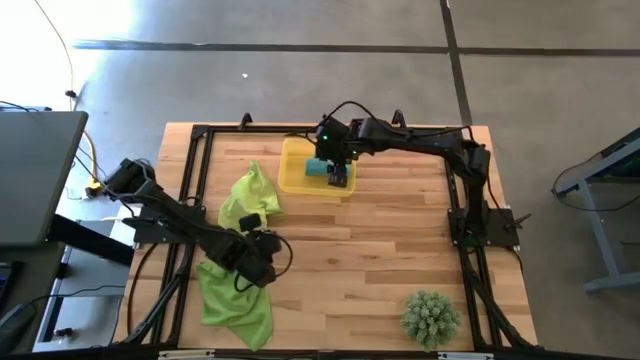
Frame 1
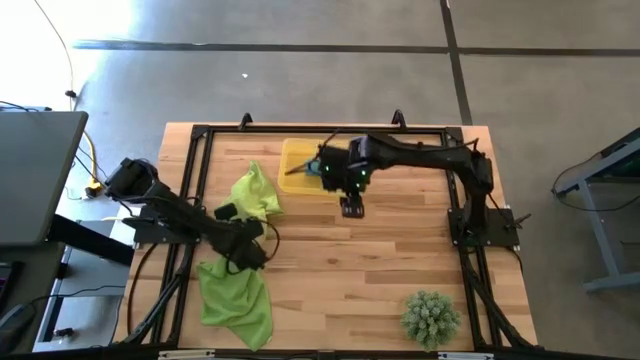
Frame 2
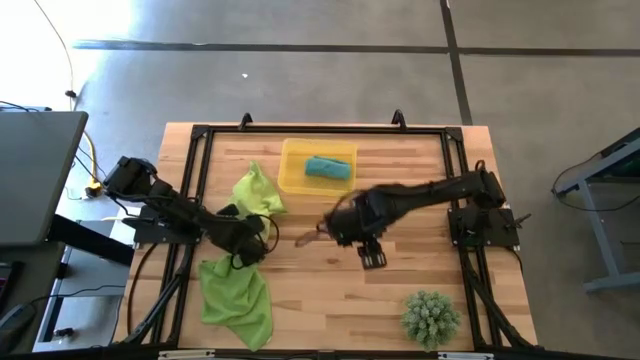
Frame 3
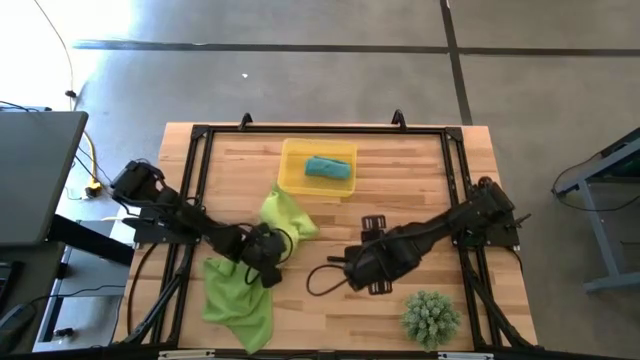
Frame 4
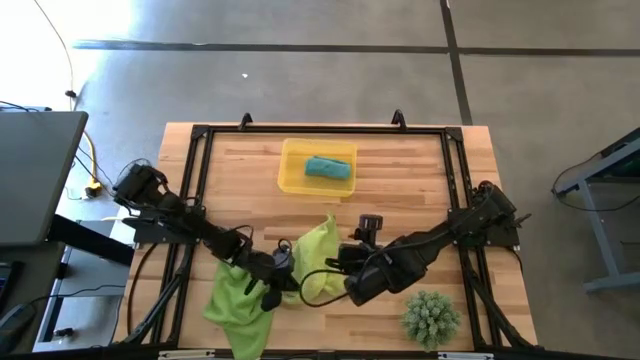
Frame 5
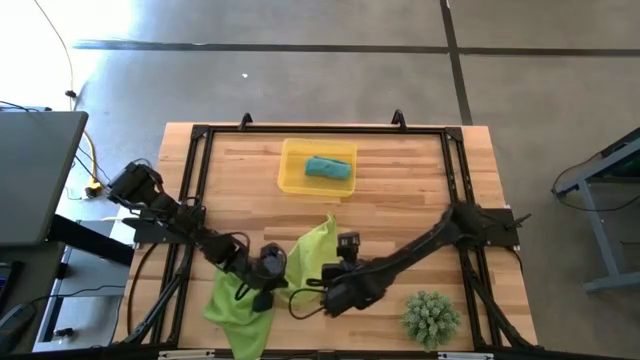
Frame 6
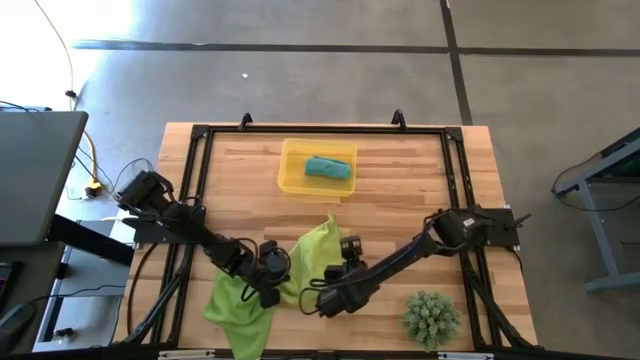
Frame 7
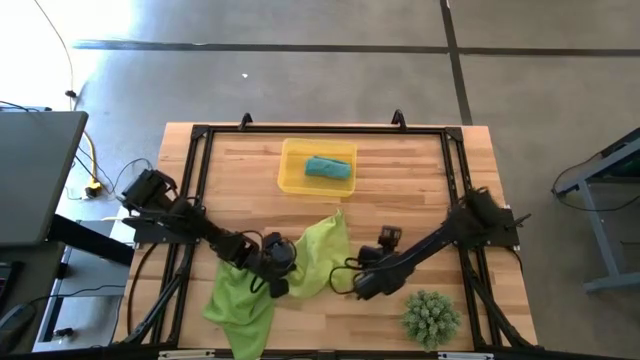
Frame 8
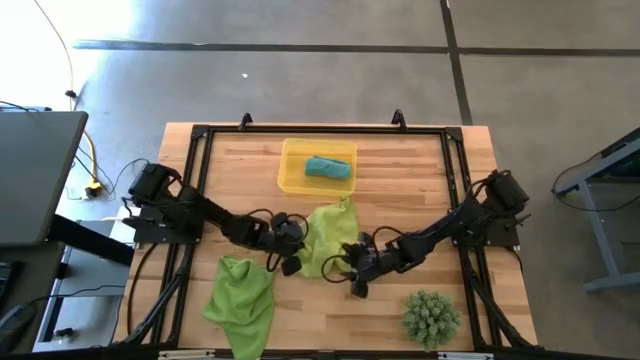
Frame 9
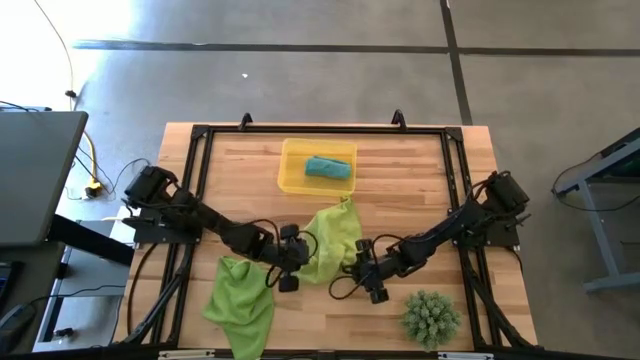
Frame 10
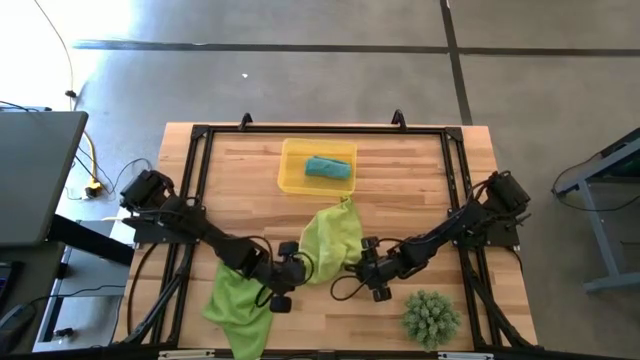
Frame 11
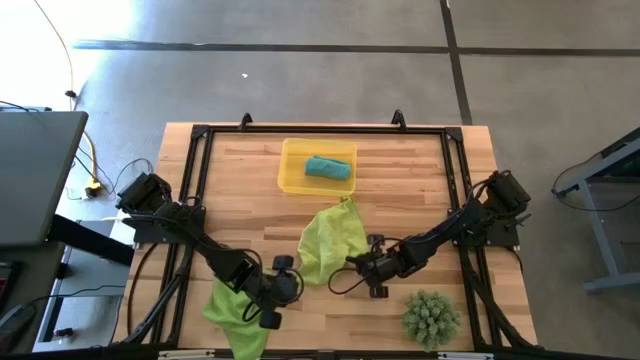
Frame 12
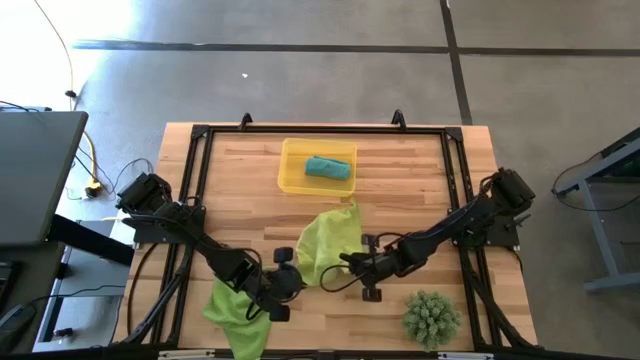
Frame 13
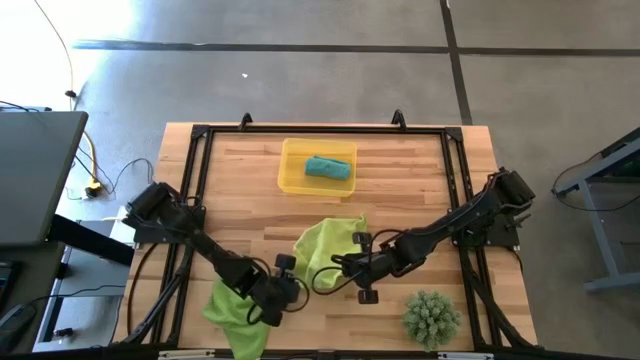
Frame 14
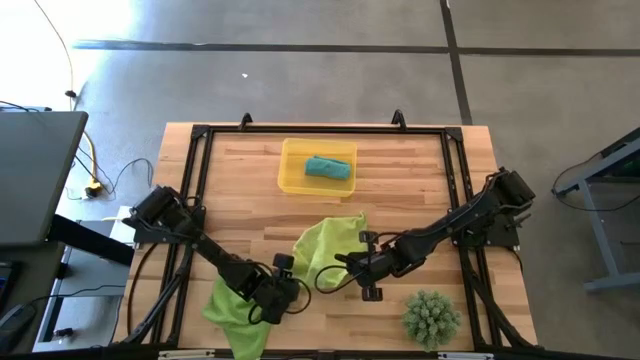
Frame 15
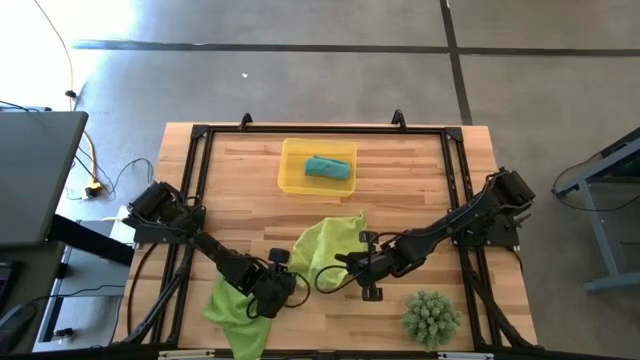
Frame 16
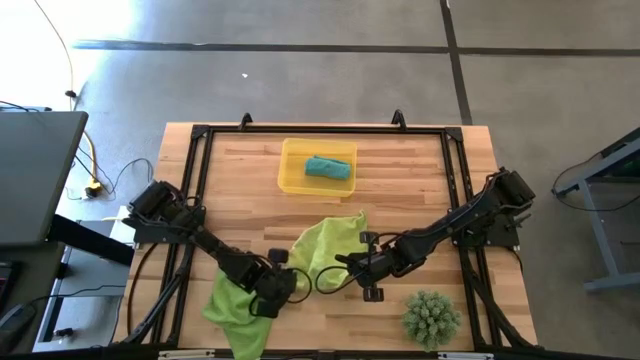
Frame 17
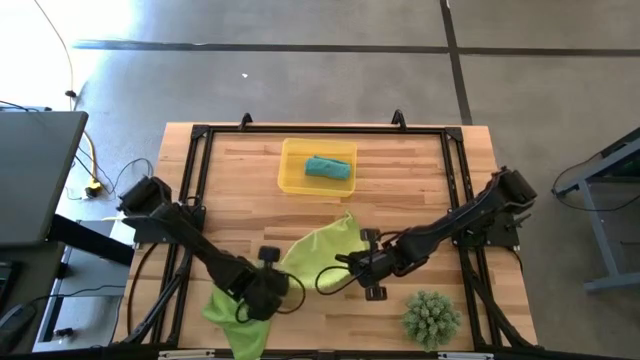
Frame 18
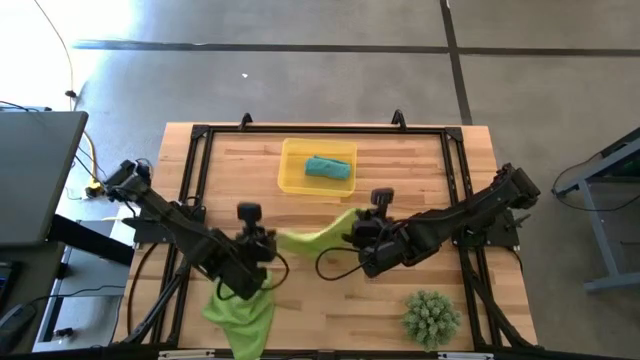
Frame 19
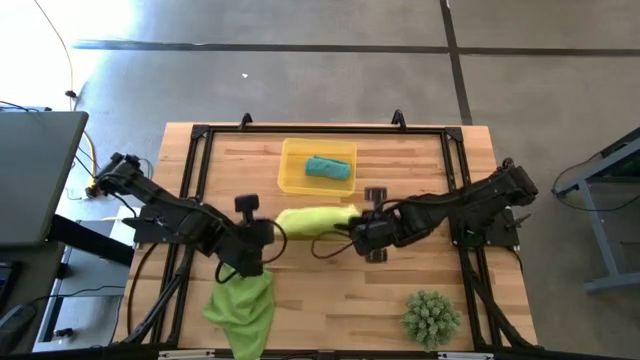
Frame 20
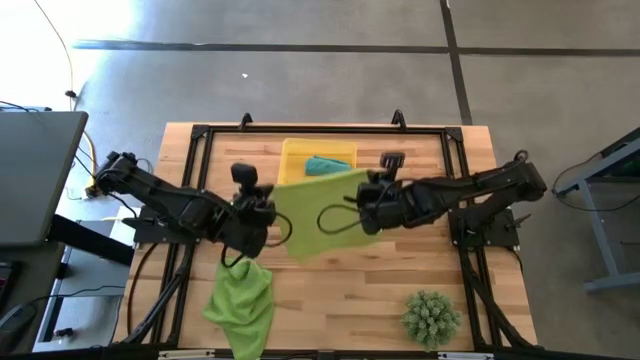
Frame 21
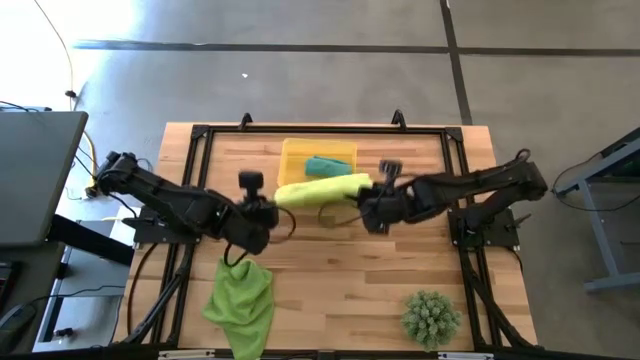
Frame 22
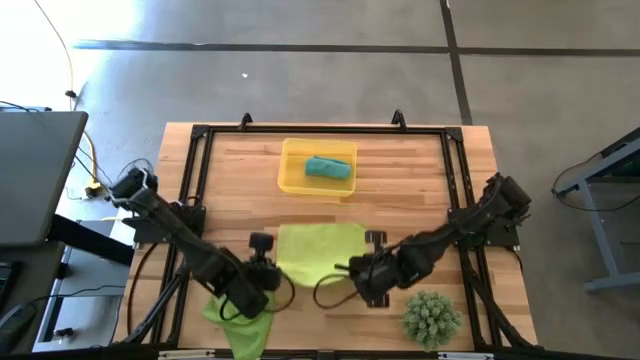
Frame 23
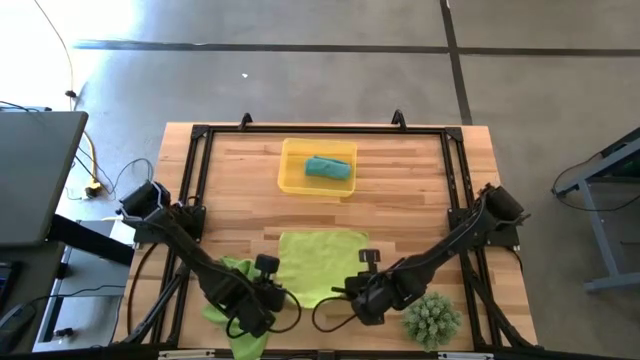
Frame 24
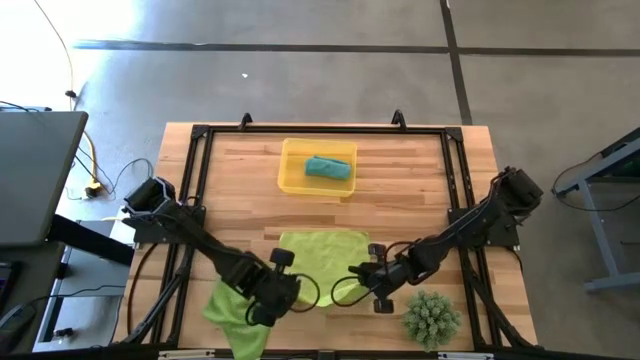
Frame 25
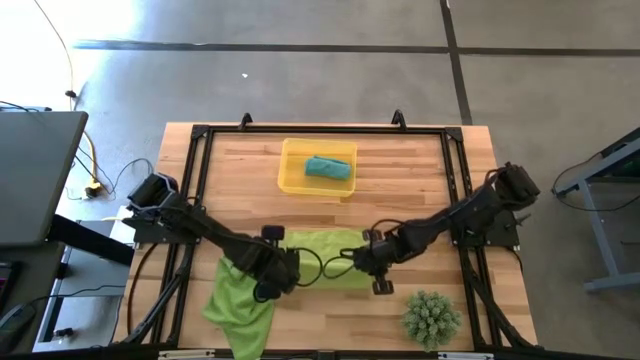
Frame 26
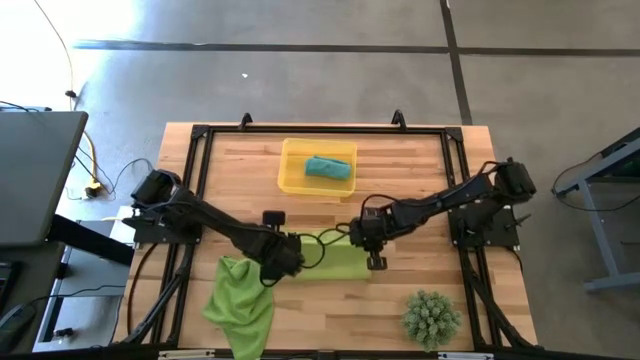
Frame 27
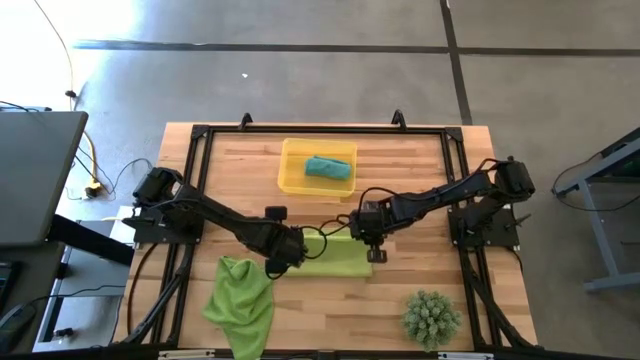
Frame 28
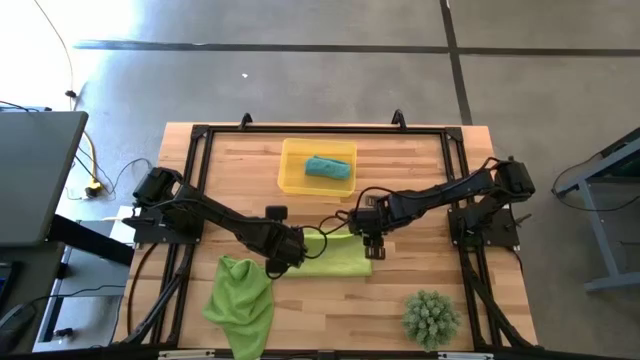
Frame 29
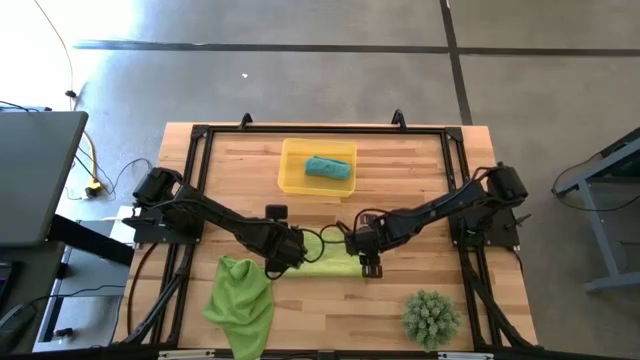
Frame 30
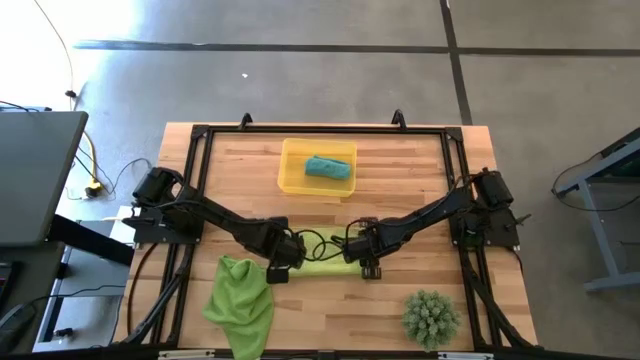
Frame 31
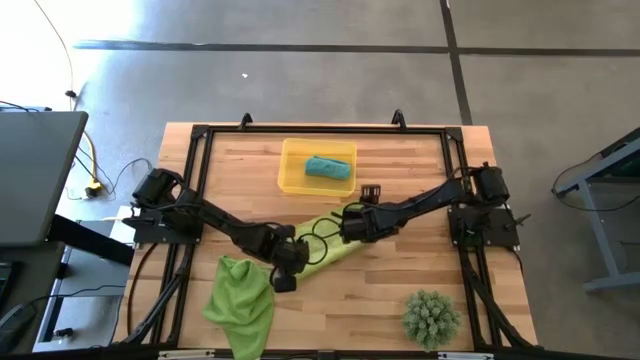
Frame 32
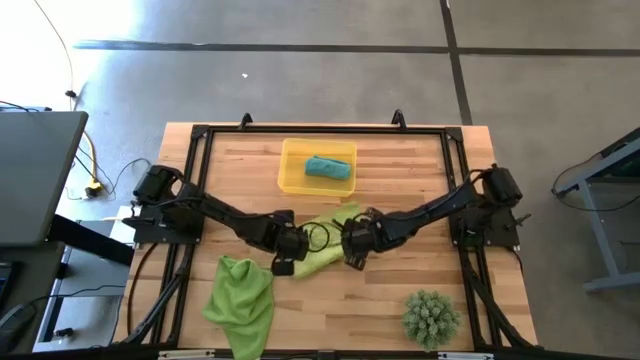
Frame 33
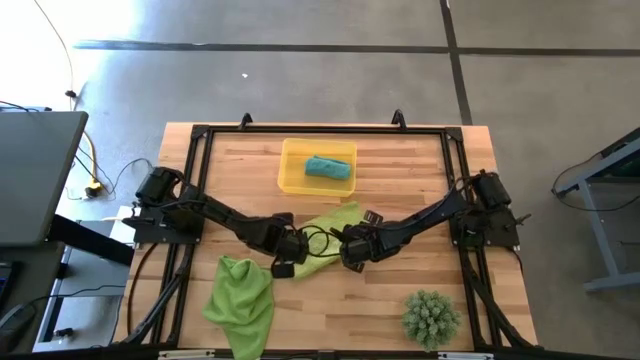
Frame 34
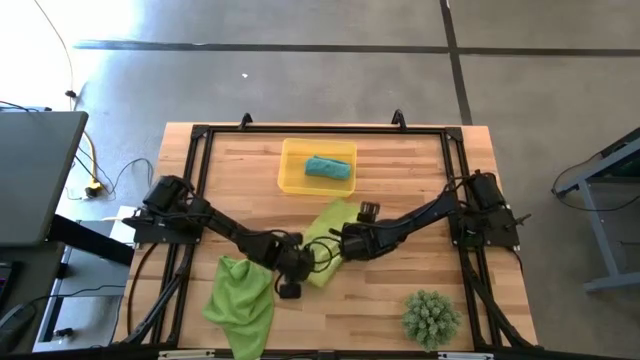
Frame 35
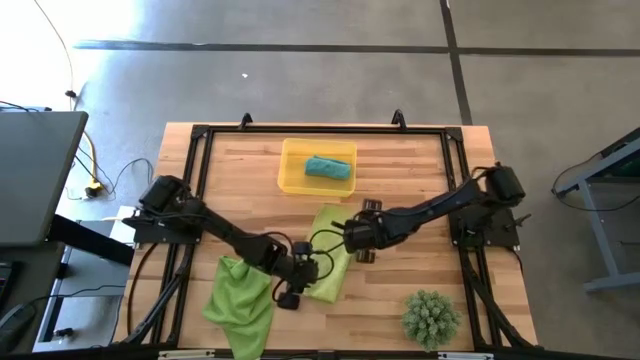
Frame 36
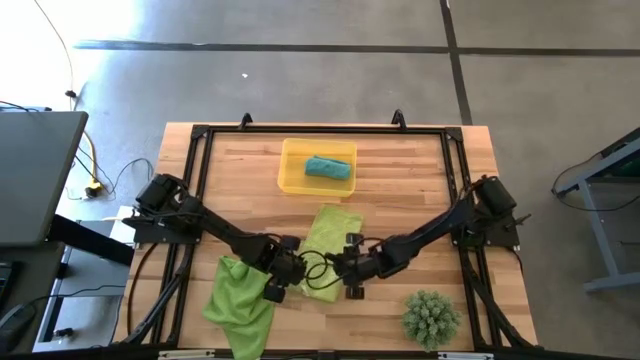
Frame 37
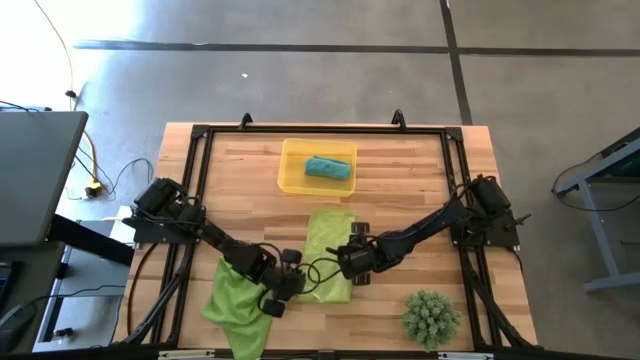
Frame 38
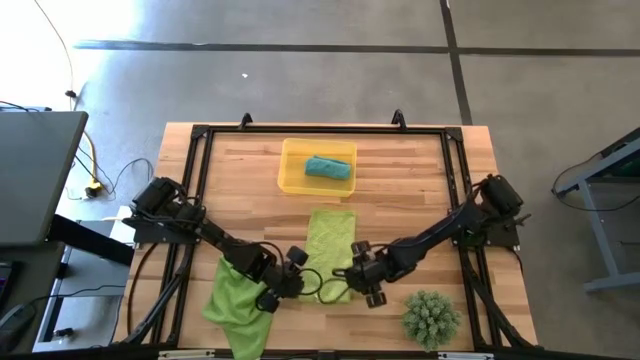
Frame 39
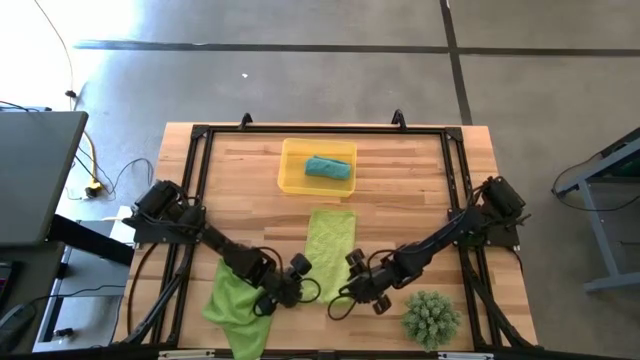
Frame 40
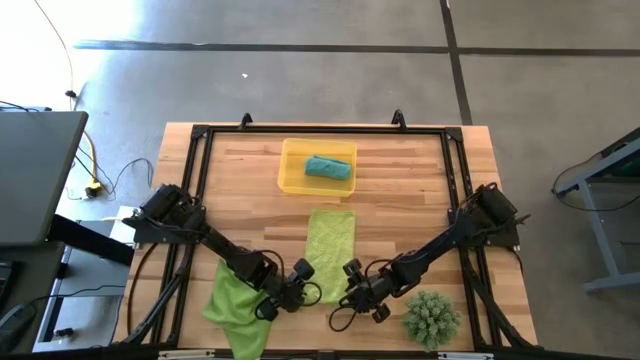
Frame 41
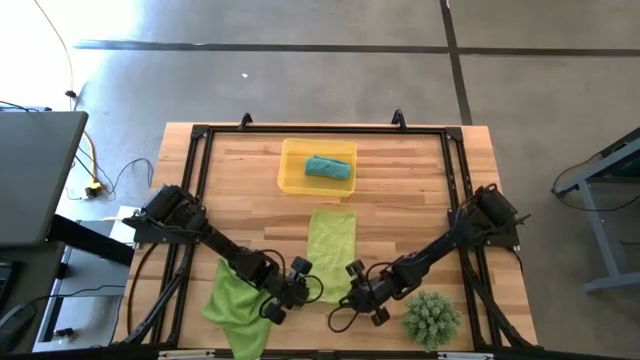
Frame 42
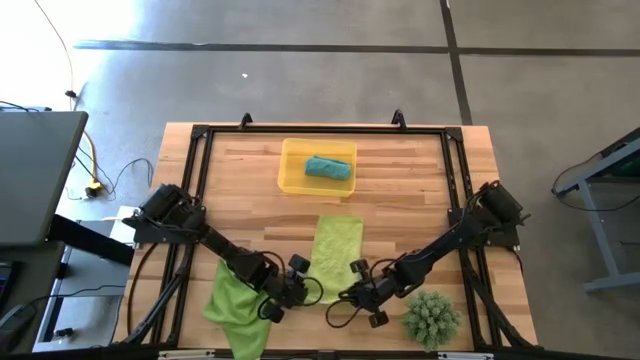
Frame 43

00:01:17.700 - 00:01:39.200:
Task: Roll microfiber towels into tight, uniform cylinder then place into a basket
Roll the light green microfiber towel
